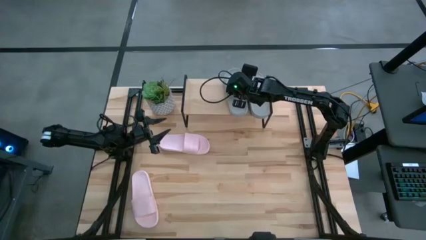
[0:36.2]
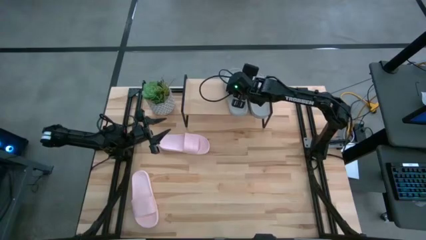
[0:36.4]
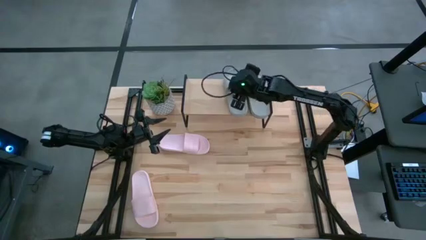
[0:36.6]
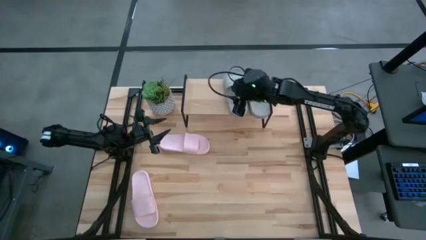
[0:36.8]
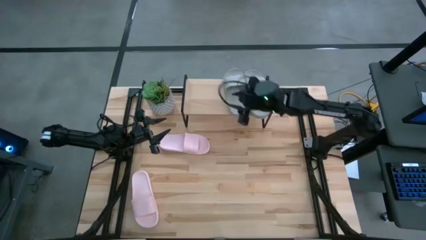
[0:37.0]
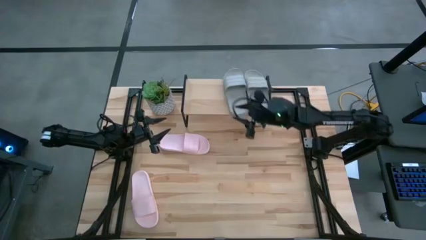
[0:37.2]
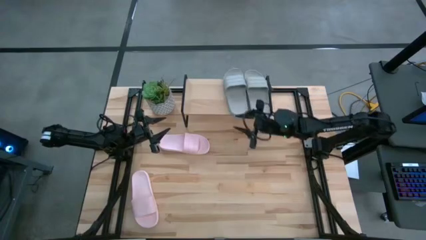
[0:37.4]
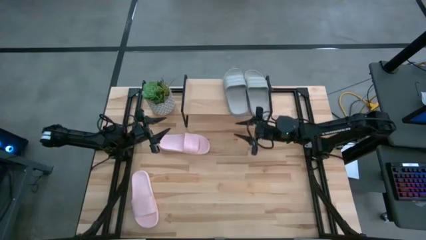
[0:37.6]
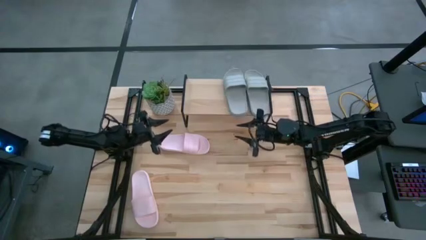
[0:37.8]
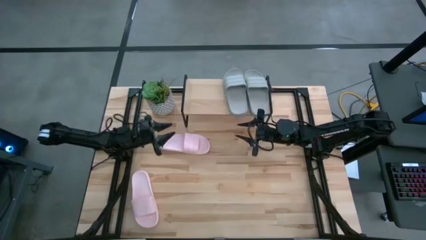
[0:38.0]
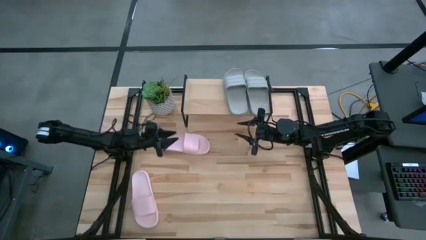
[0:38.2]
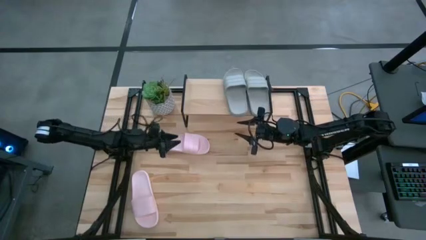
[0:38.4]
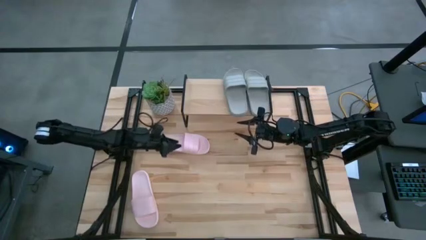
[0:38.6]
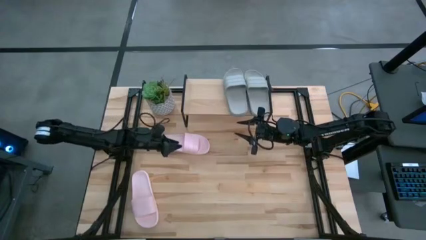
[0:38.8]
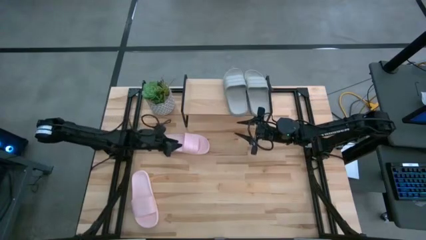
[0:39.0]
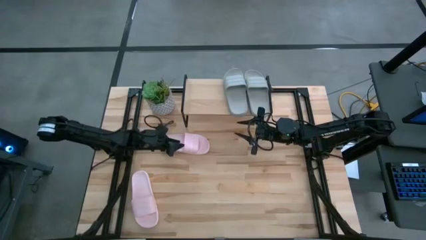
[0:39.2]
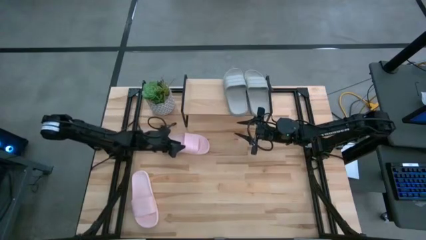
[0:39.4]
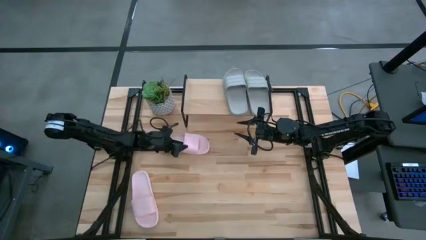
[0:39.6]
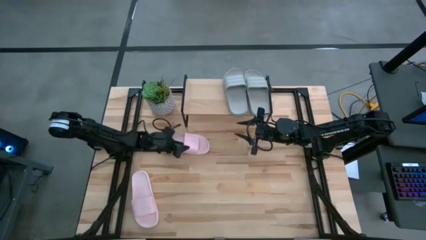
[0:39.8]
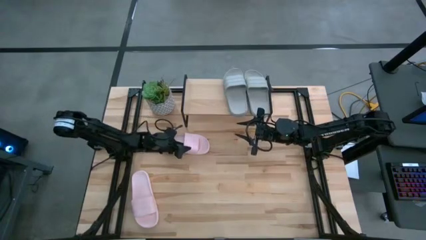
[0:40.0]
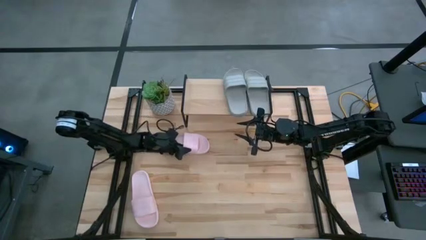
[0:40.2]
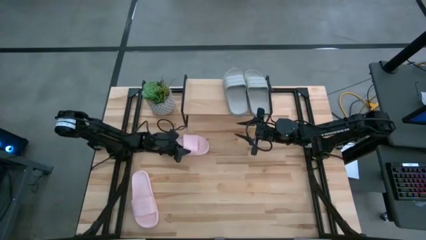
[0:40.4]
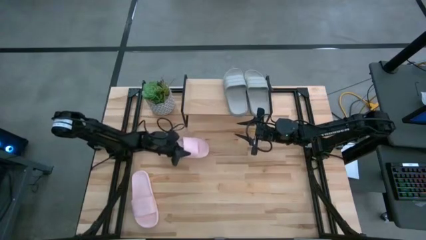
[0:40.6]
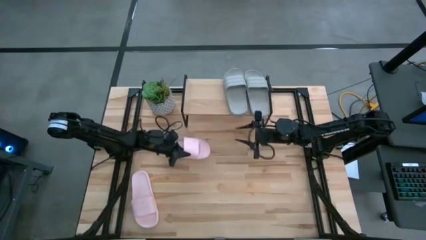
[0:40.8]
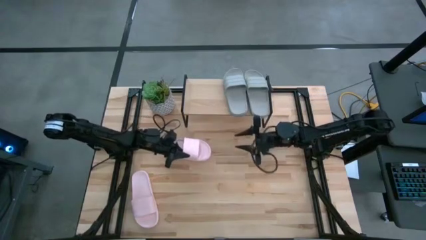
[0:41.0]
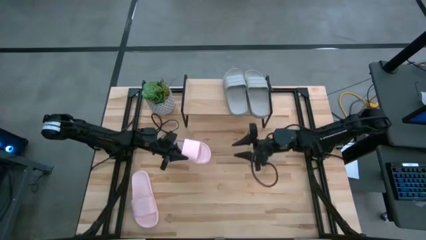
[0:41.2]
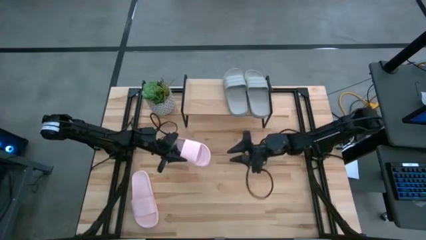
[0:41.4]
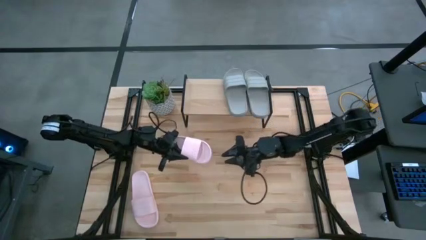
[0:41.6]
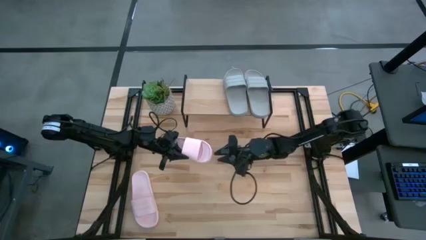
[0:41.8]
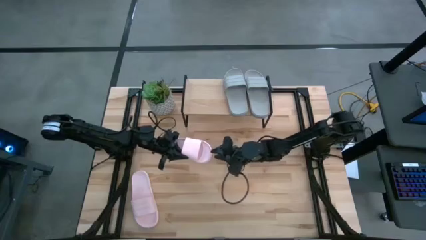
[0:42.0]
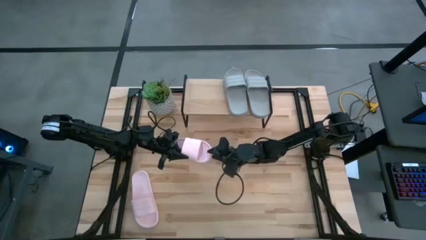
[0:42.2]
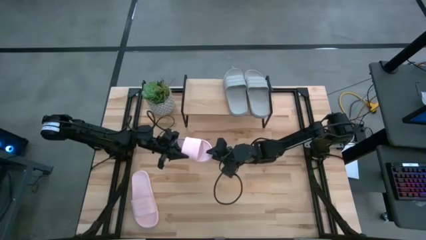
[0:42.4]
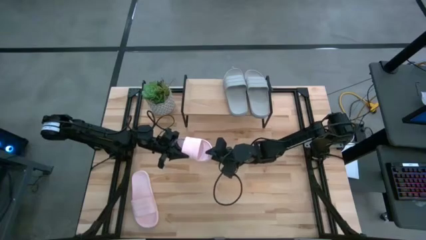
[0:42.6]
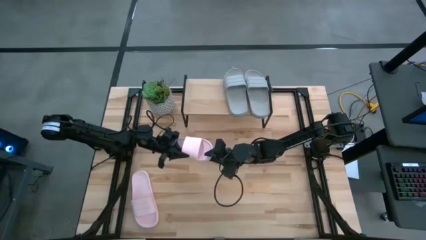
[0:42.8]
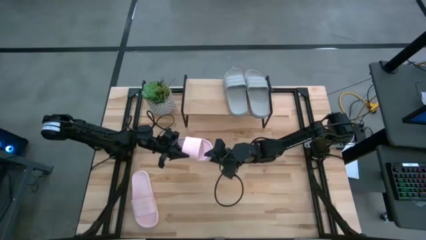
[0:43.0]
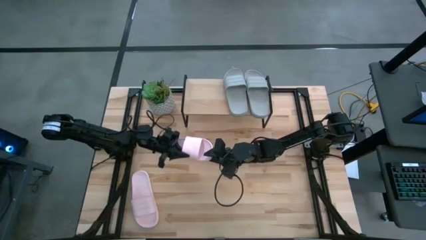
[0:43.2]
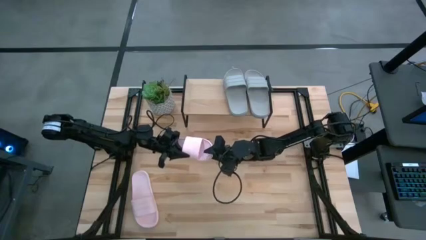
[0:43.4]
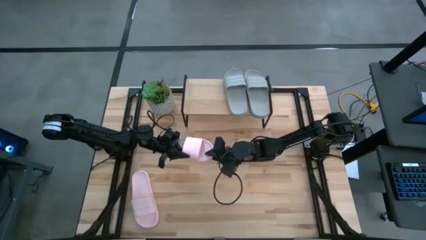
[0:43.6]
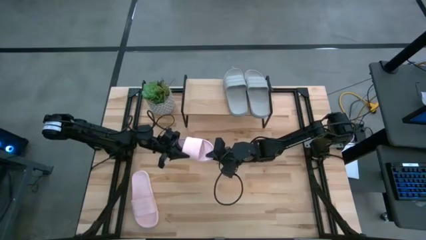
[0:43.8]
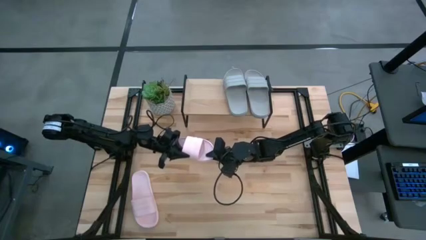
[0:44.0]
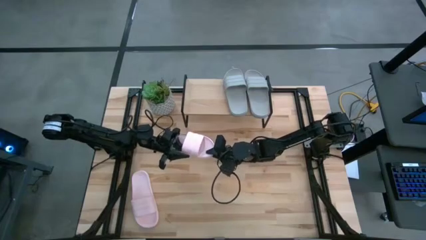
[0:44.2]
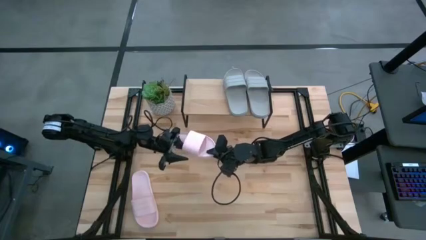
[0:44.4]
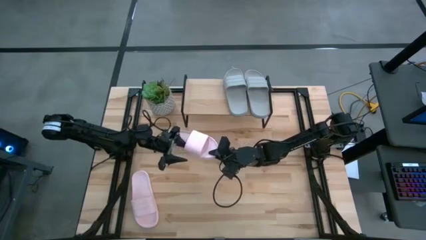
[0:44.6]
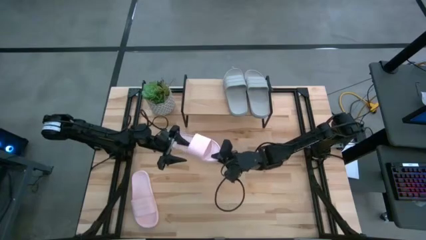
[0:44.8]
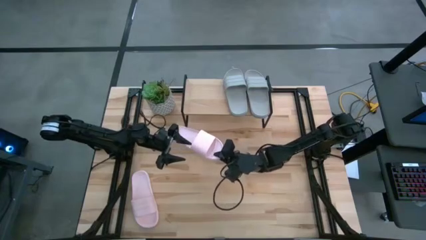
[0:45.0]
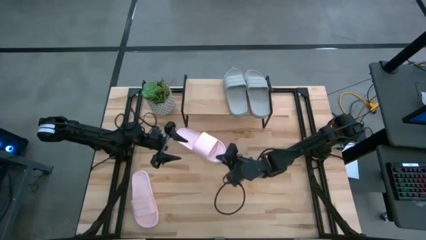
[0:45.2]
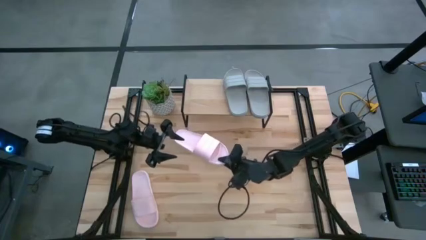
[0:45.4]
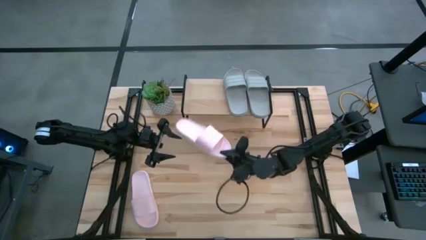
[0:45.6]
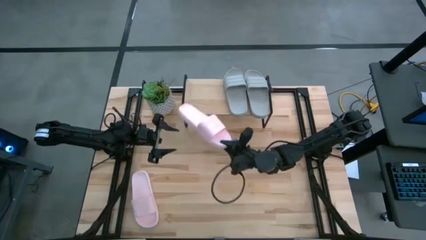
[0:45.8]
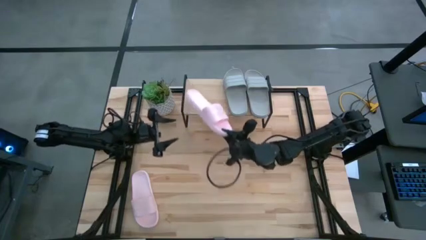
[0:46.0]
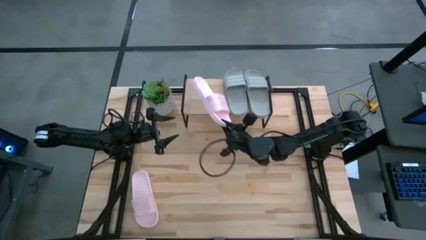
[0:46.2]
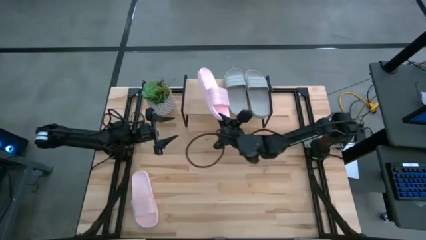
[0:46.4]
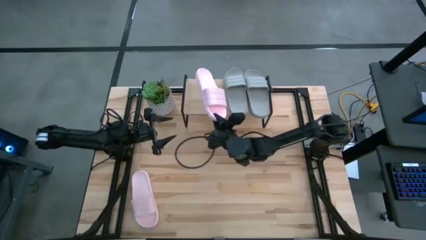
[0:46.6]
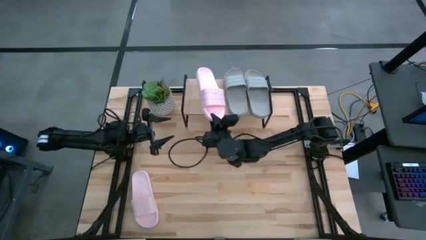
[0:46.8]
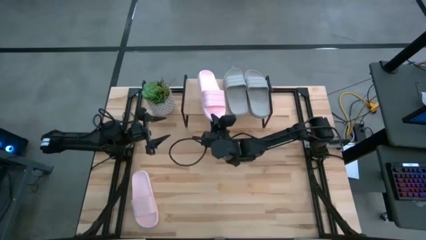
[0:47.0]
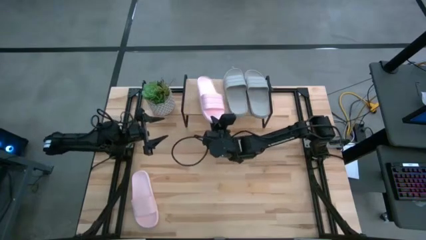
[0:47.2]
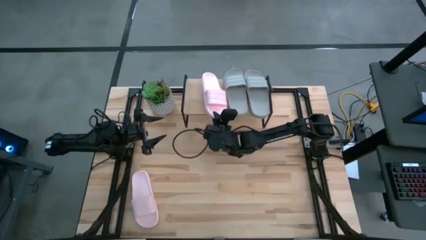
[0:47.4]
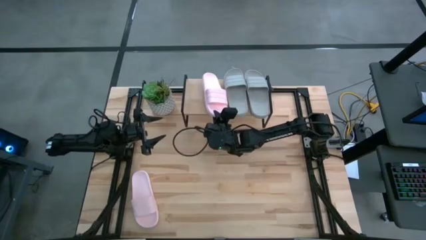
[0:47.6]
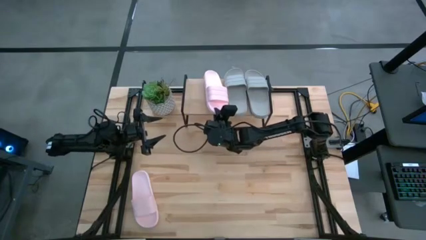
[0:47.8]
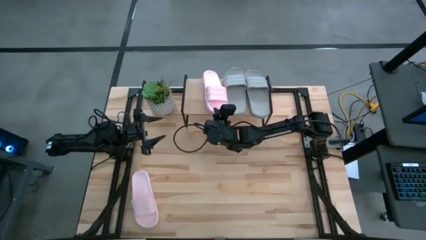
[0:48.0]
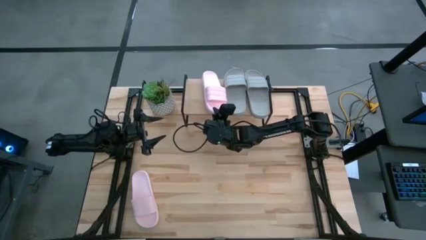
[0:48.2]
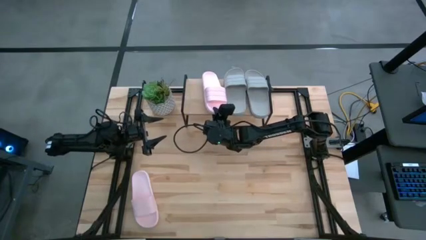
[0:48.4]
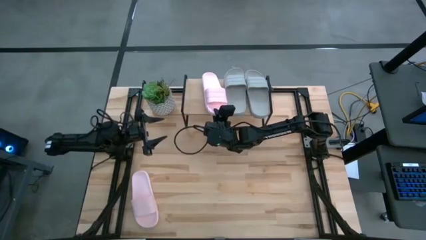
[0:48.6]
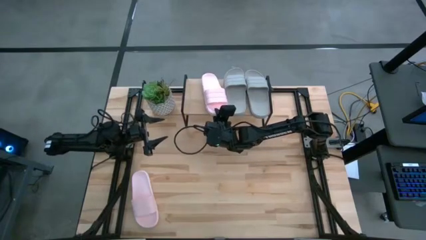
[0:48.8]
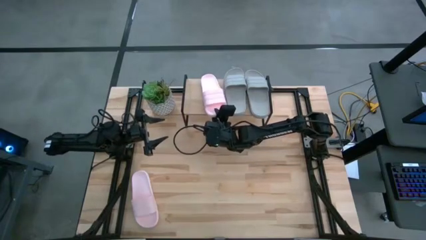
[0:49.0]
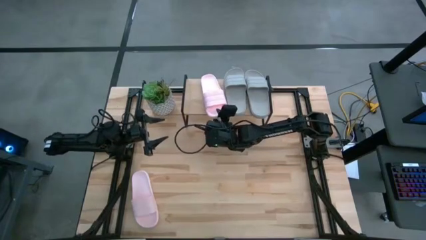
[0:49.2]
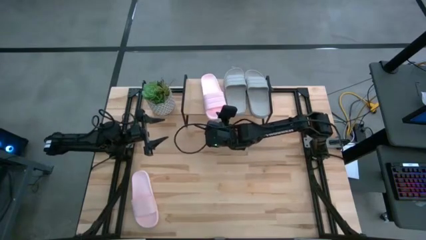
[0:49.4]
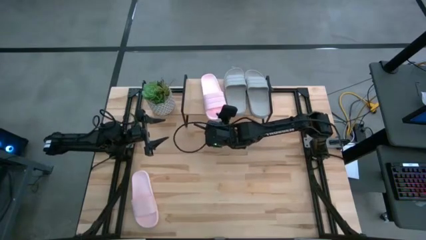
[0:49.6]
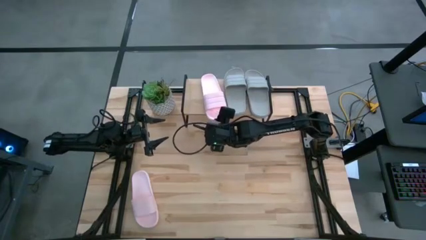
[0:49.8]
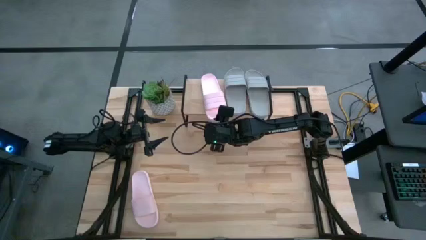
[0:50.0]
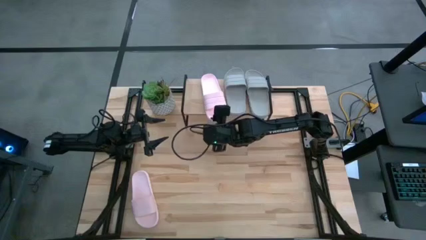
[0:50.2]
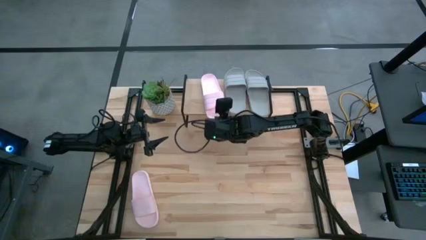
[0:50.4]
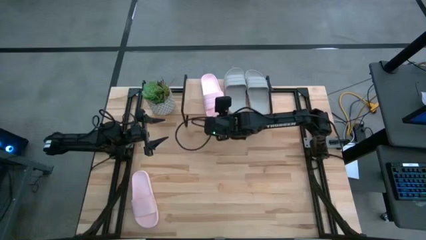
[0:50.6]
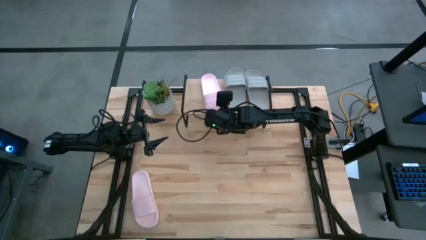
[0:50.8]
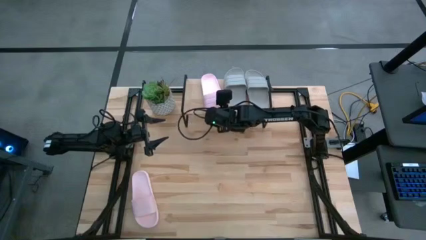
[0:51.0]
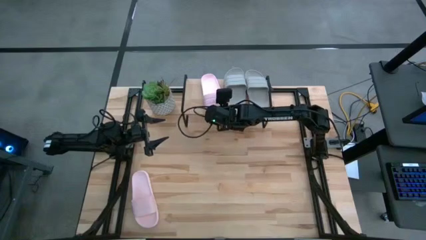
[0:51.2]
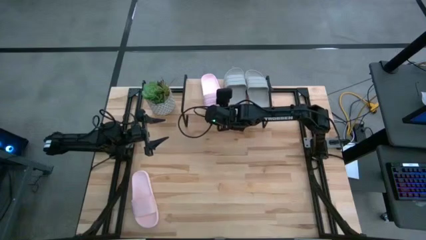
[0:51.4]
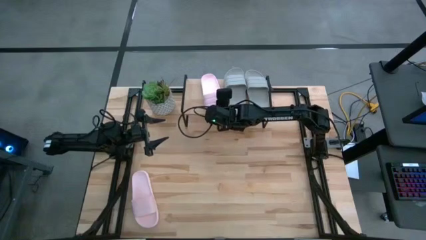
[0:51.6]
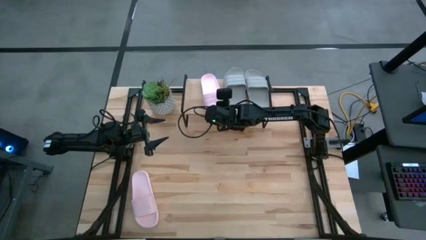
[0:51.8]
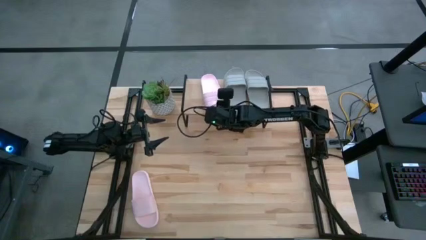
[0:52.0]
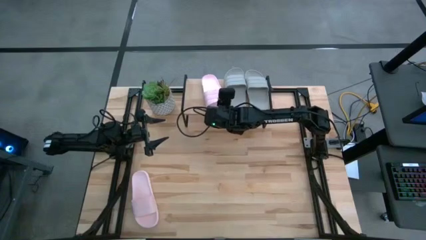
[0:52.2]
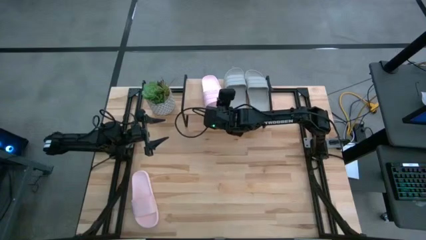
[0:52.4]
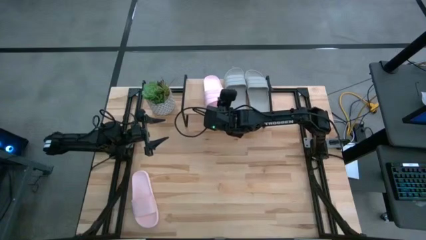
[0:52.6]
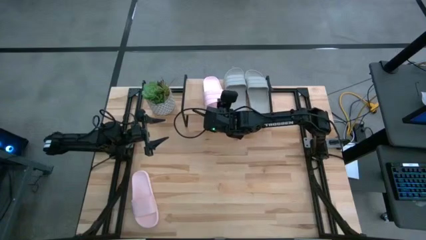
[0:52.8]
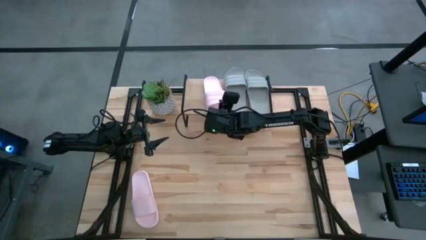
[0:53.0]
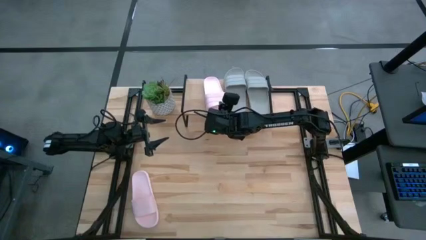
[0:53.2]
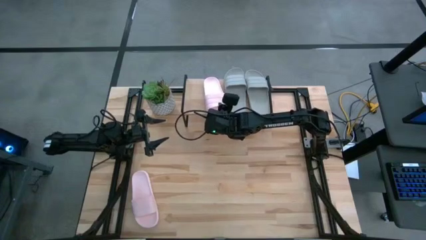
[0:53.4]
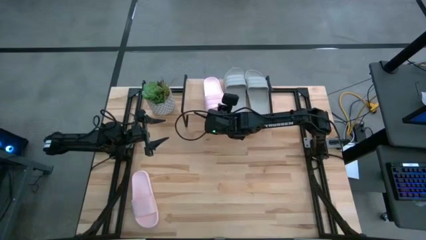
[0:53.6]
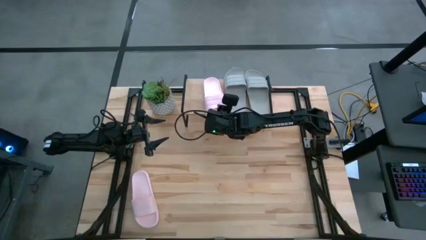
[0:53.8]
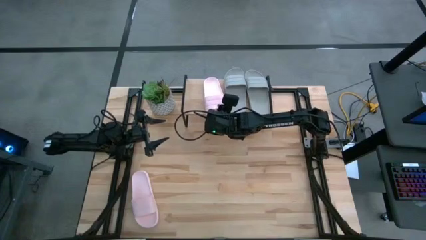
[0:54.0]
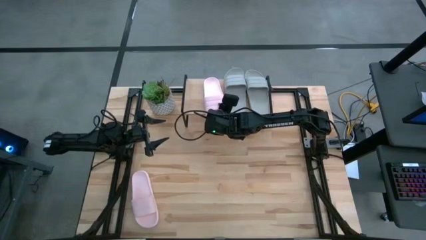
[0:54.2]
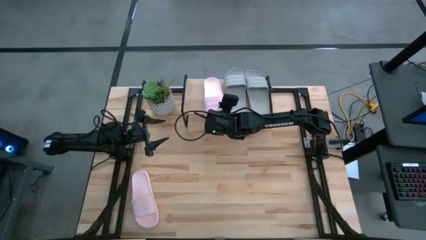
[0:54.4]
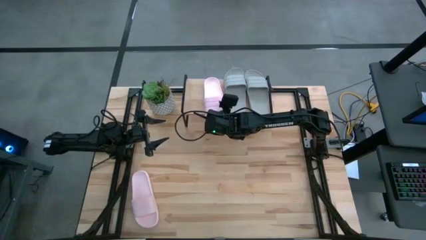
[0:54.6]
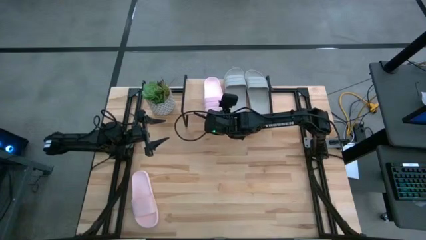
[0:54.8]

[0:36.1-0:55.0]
Task: Pick and place slides into the shelf
Put the top pink slide on the shelf
